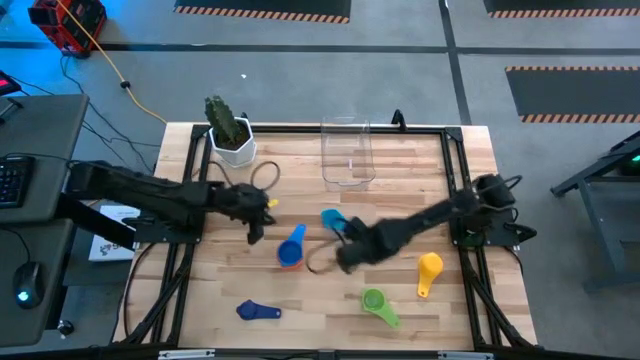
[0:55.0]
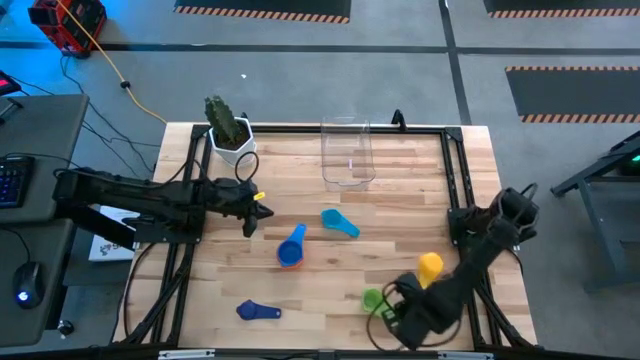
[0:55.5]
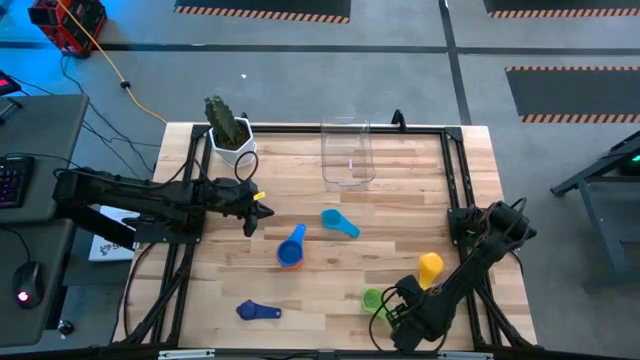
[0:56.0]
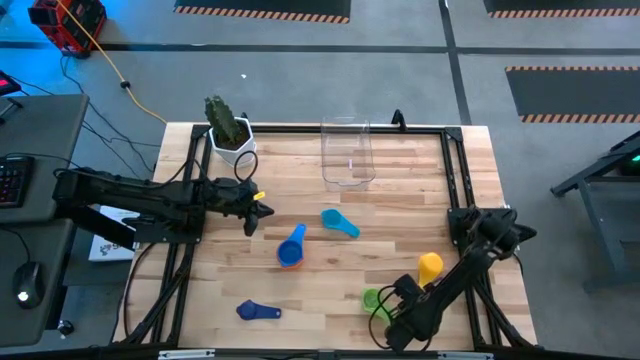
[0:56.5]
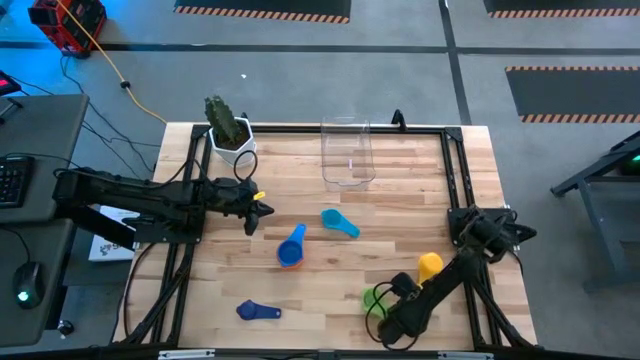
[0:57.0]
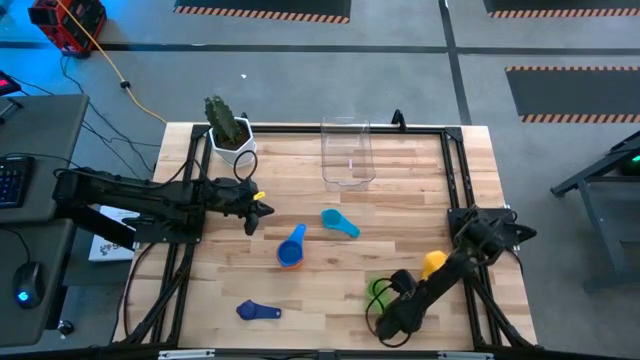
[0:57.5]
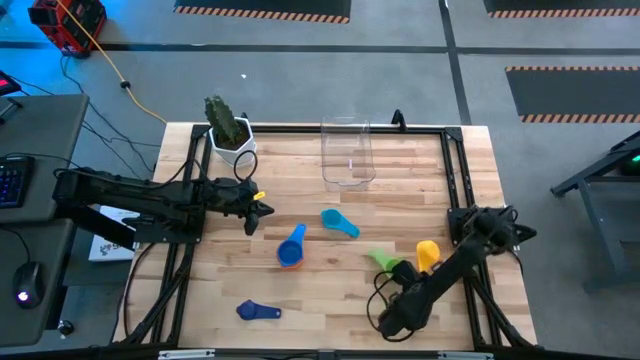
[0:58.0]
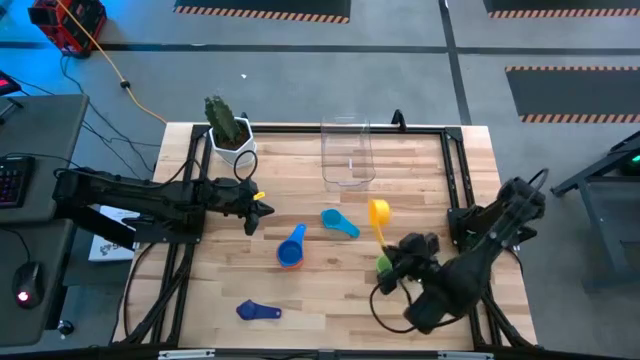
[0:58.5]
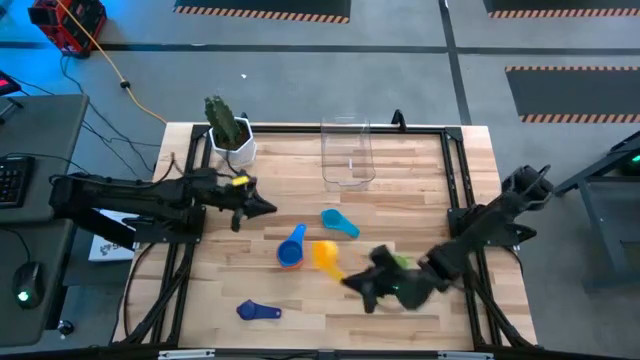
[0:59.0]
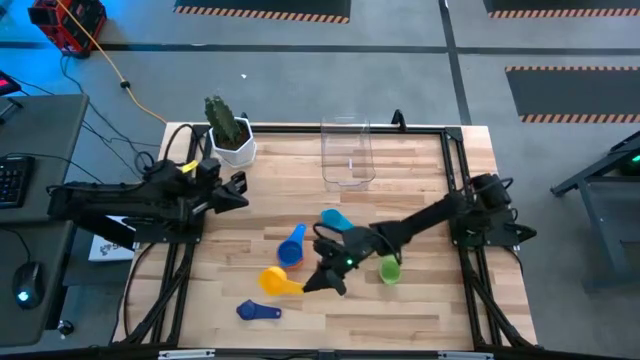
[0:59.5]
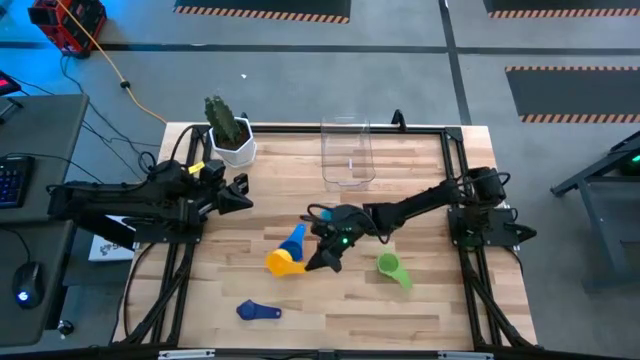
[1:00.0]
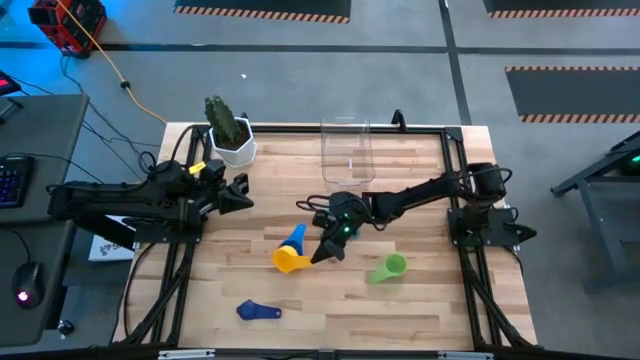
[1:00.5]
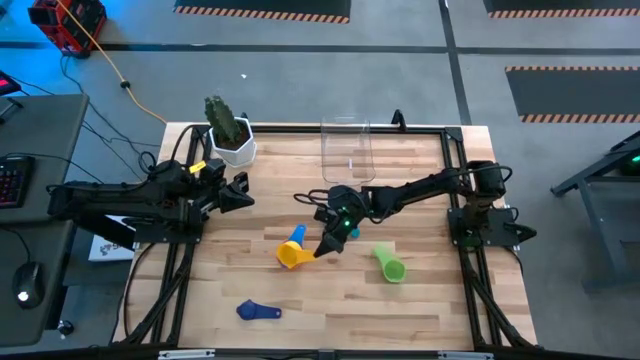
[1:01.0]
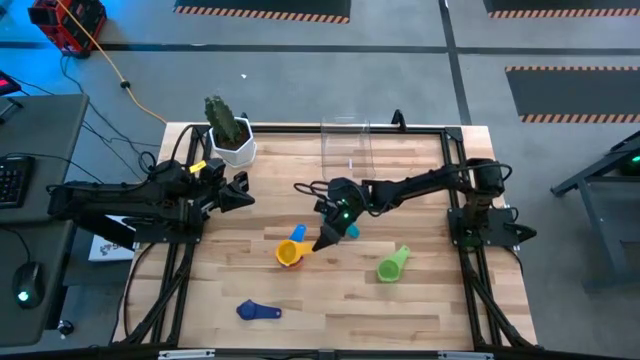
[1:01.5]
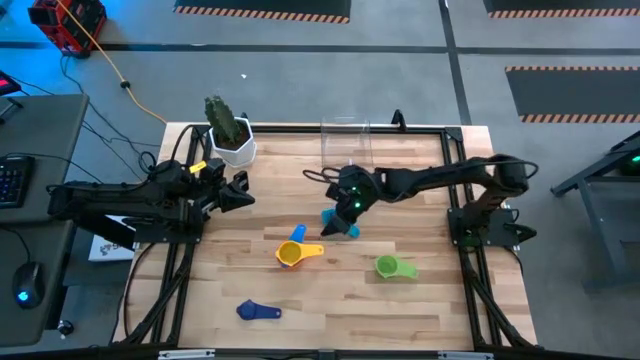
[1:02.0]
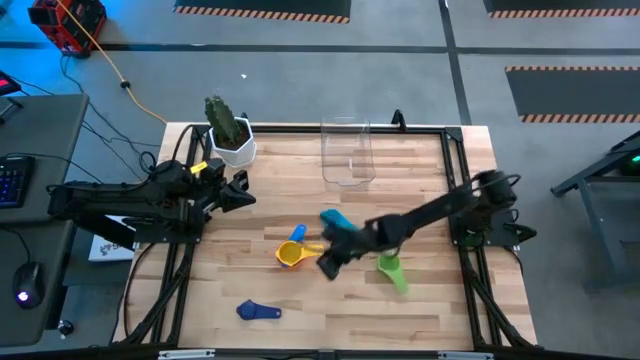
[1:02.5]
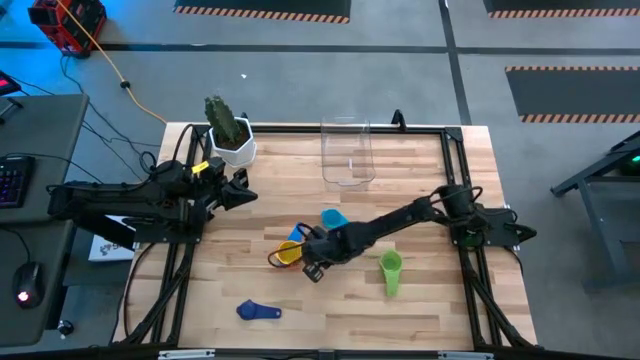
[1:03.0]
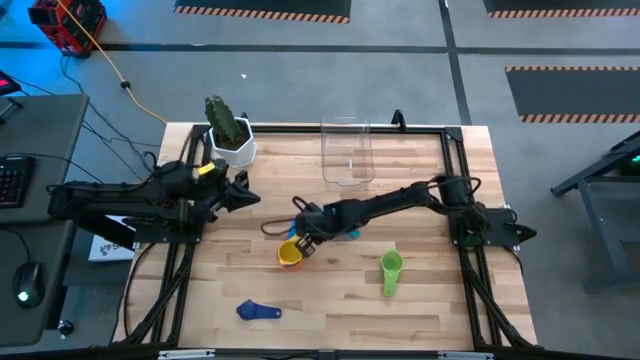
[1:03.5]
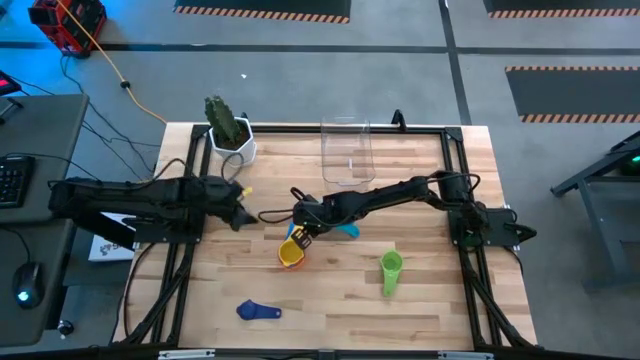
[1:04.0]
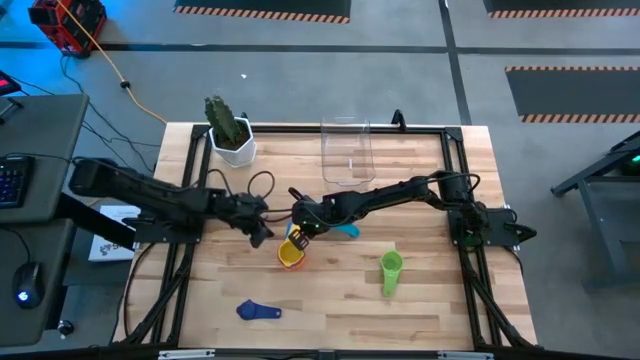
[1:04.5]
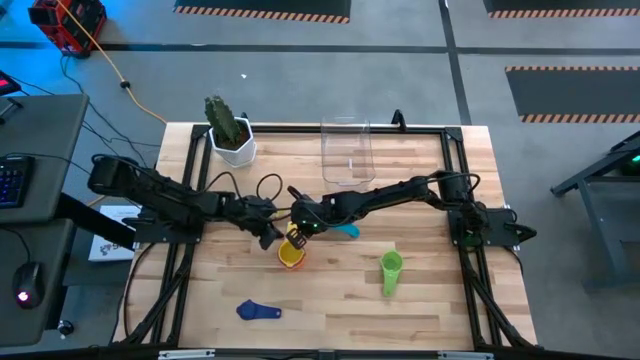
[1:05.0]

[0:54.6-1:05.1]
Task: Nest measuring cups in basket
Stack the yellow measuring cup on top of the blue measuring cup

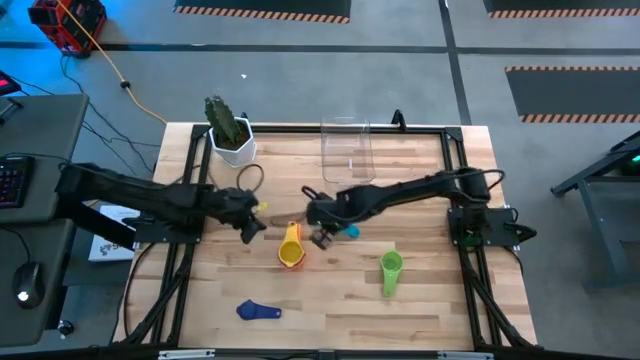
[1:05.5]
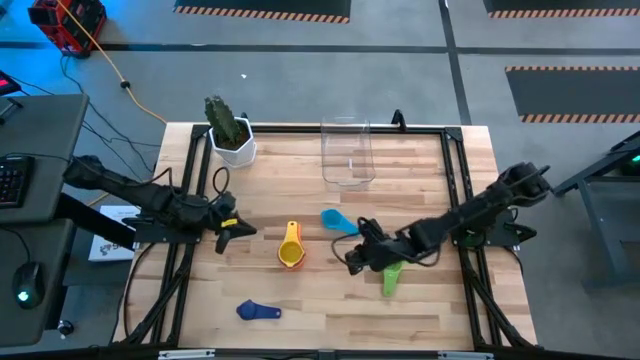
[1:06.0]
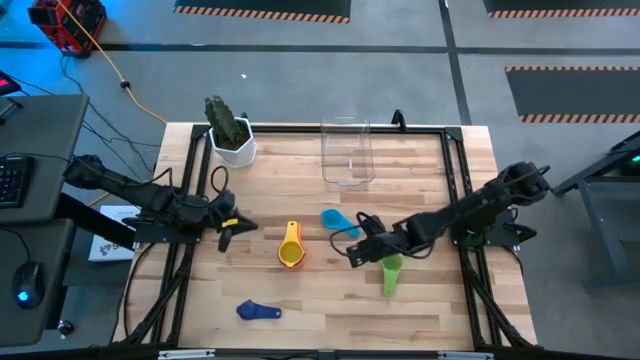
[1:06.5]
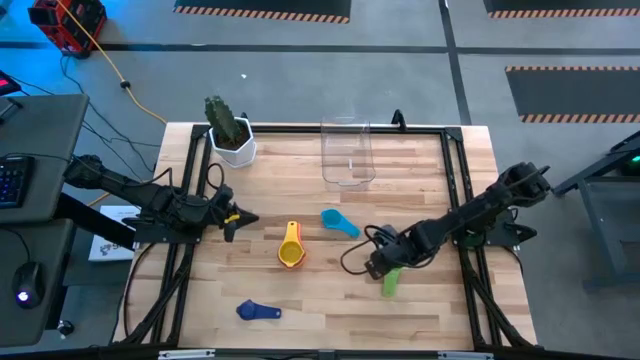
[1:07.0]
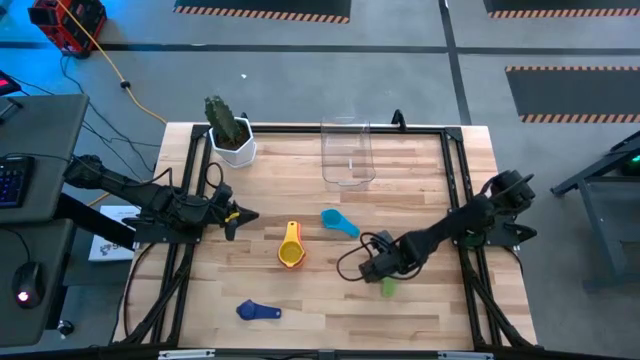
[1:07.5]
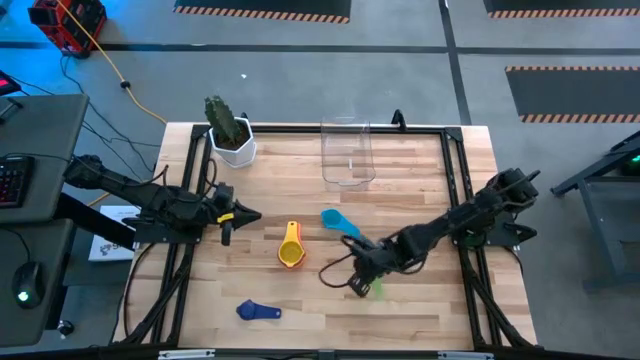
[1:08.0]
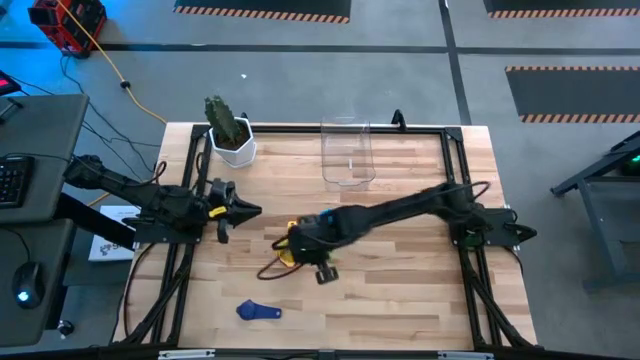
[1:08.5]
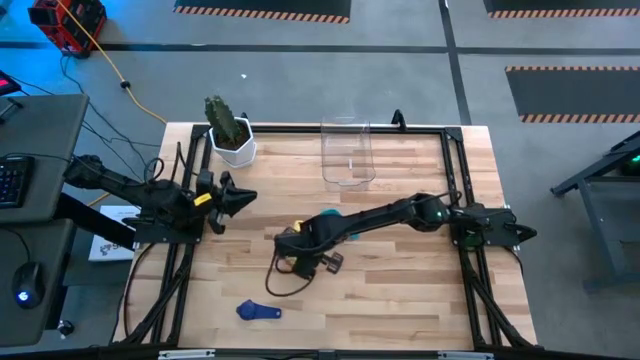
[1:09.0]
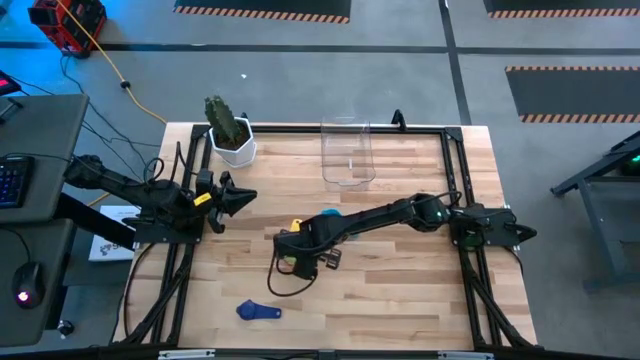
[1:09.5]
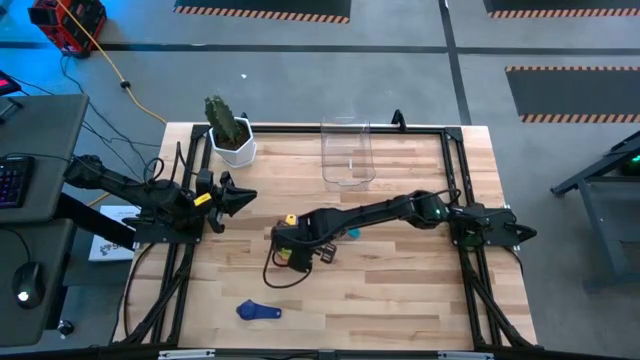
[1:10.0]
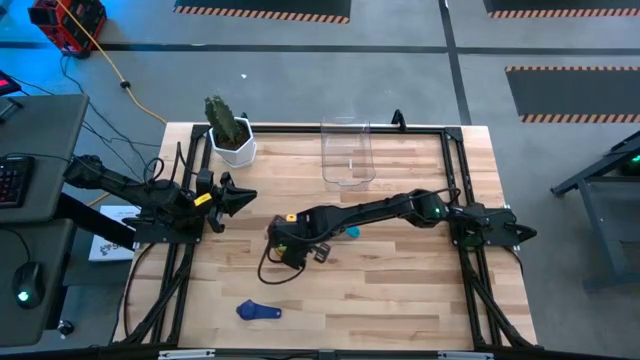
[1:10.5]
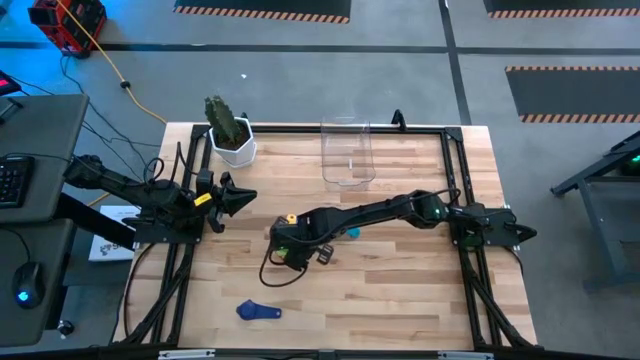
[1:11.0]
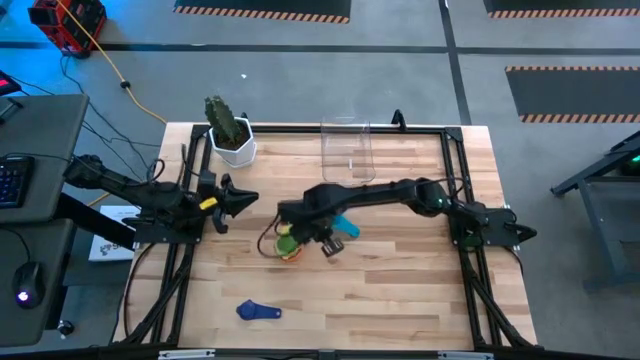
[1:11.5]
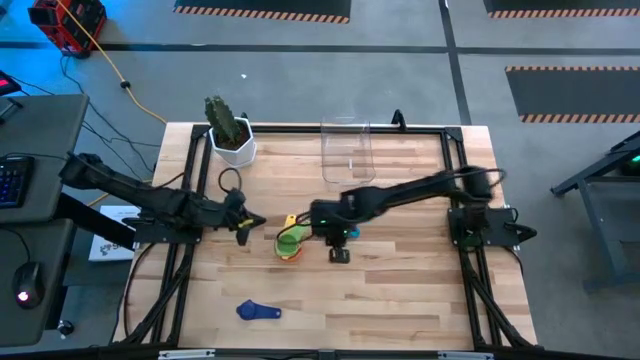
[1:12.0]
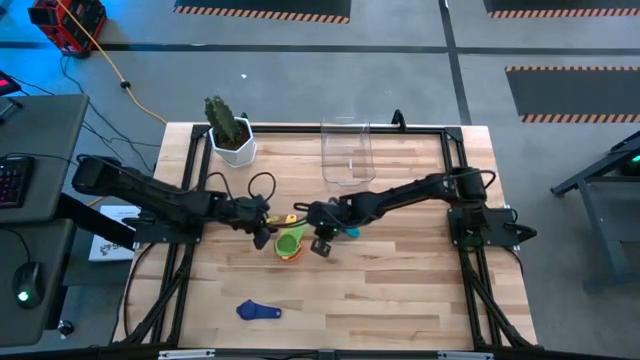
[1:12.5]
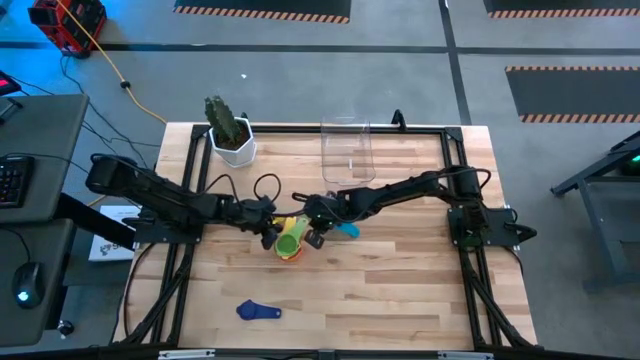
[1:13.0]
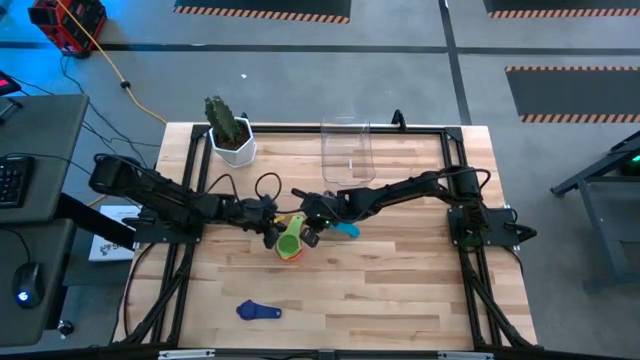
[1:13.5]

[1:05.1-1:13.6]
Stack the green measuring cup on top of the yellow measuring cup
